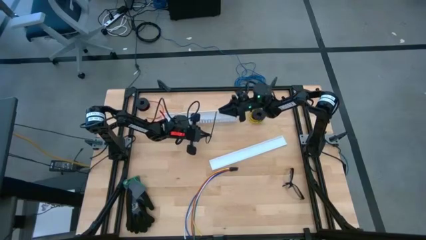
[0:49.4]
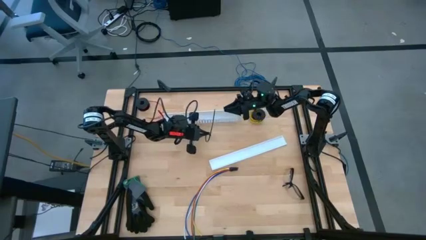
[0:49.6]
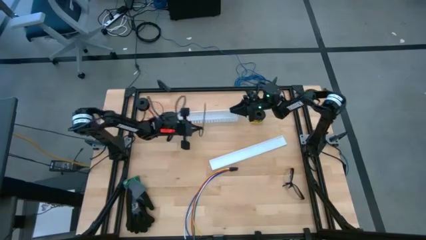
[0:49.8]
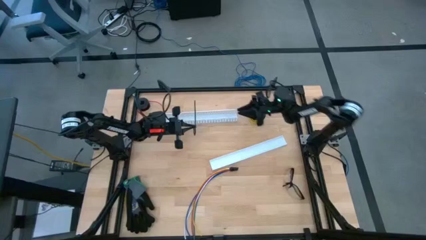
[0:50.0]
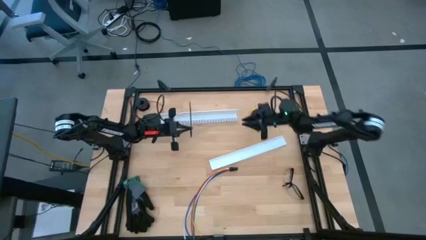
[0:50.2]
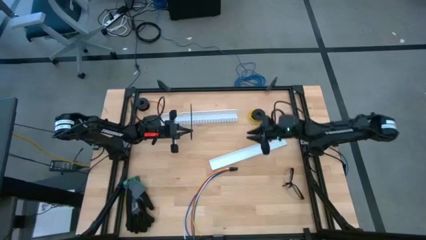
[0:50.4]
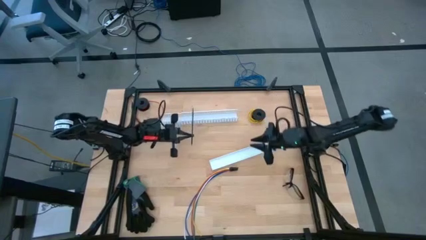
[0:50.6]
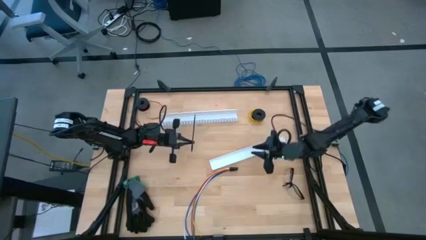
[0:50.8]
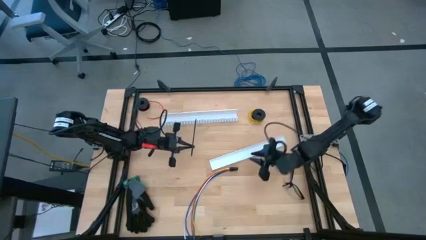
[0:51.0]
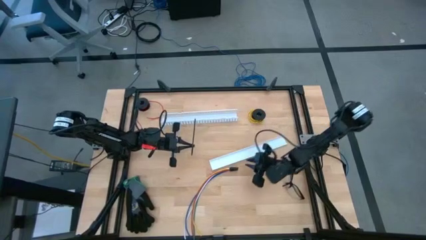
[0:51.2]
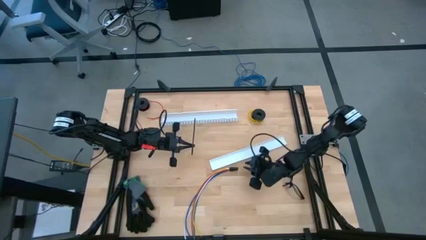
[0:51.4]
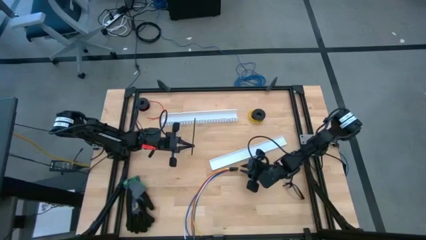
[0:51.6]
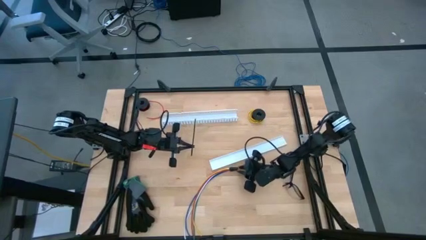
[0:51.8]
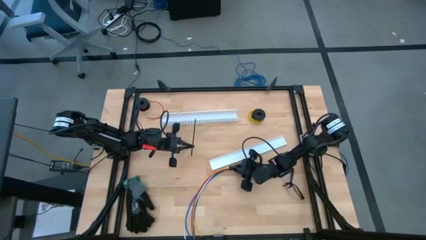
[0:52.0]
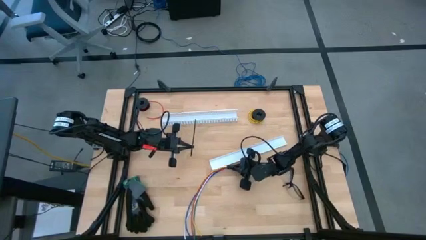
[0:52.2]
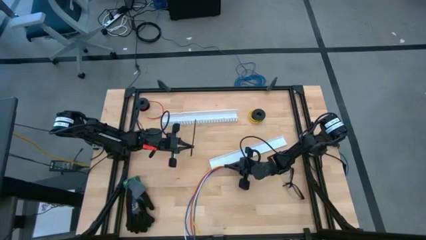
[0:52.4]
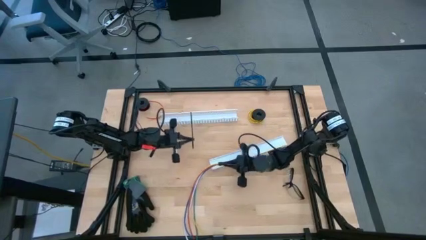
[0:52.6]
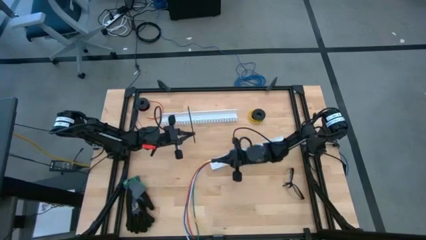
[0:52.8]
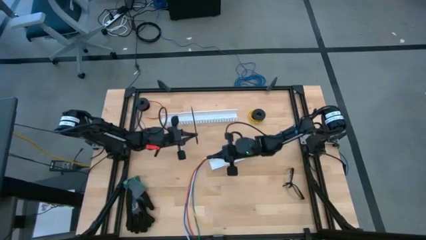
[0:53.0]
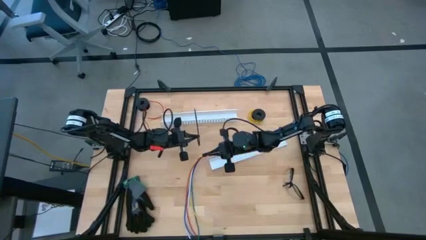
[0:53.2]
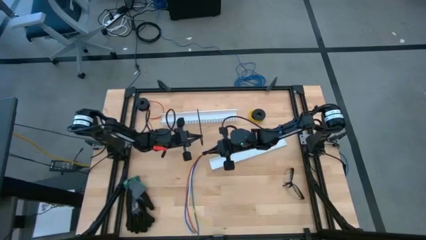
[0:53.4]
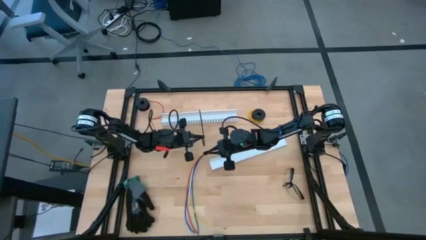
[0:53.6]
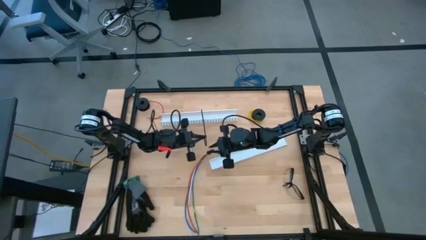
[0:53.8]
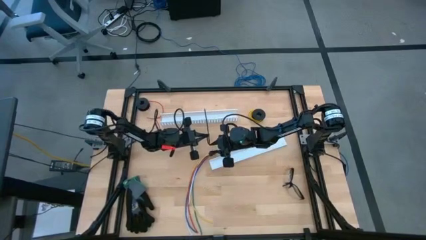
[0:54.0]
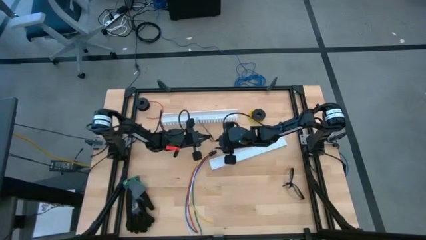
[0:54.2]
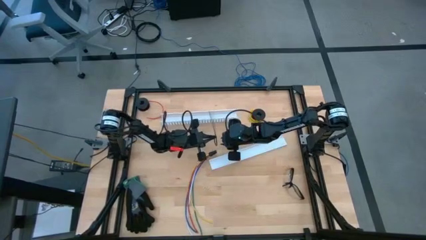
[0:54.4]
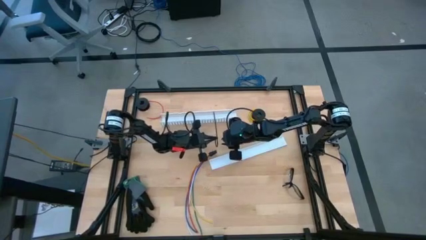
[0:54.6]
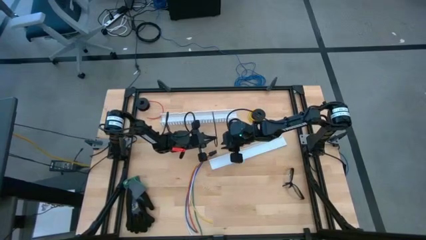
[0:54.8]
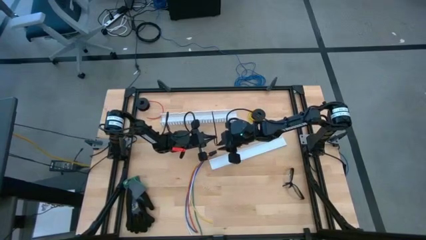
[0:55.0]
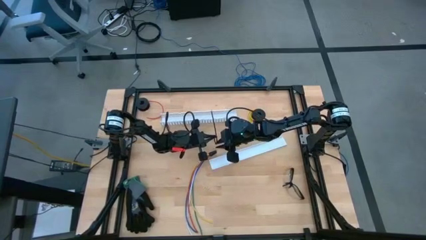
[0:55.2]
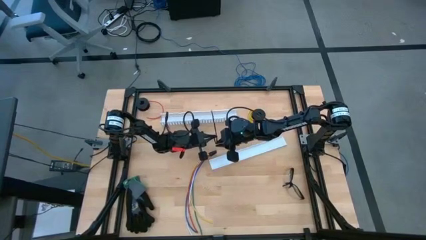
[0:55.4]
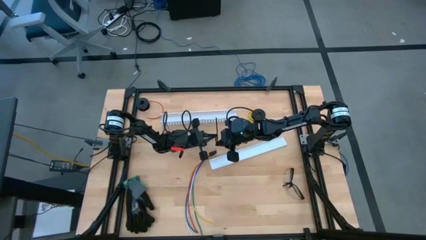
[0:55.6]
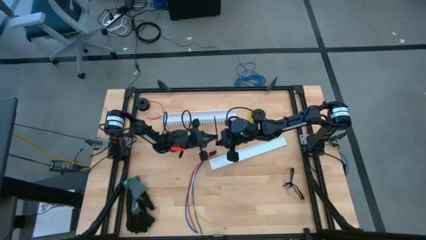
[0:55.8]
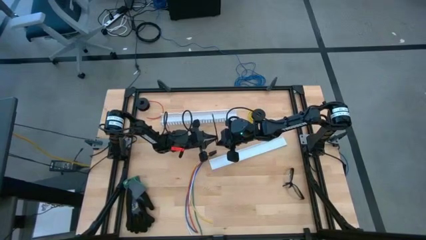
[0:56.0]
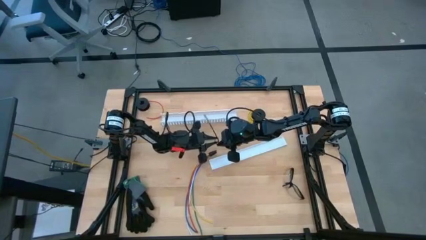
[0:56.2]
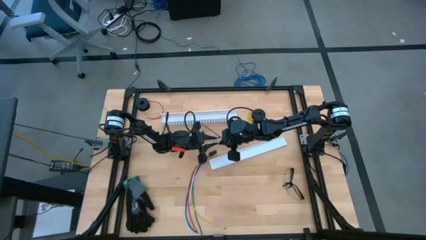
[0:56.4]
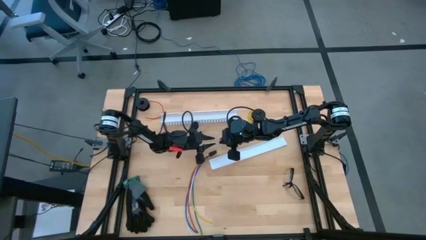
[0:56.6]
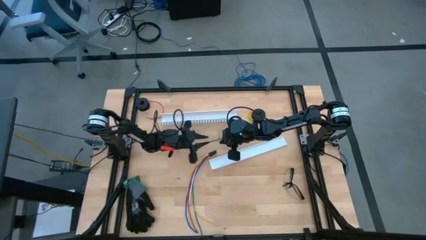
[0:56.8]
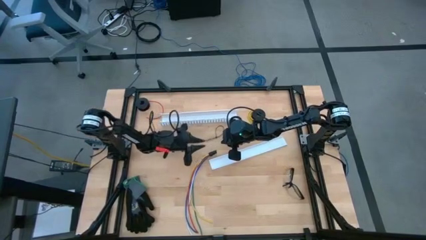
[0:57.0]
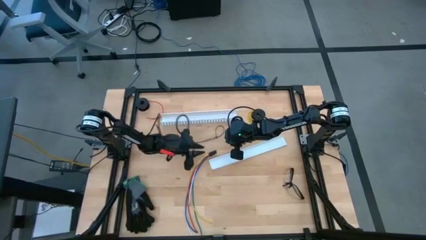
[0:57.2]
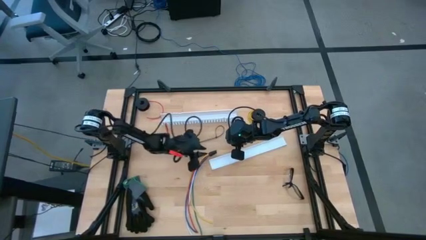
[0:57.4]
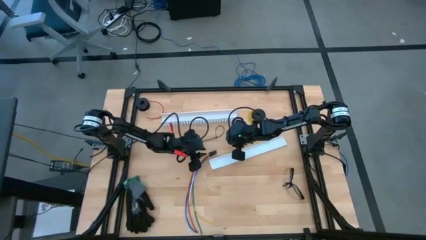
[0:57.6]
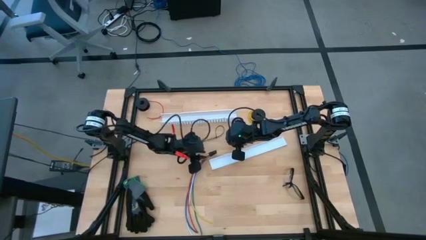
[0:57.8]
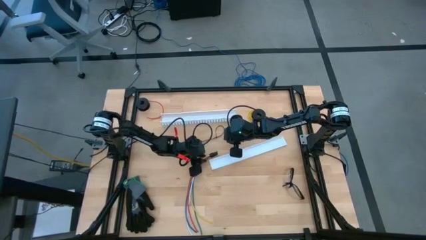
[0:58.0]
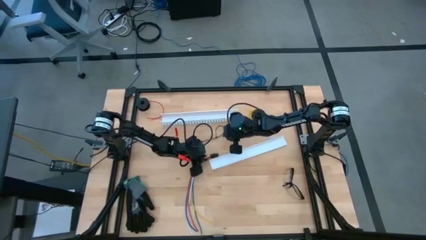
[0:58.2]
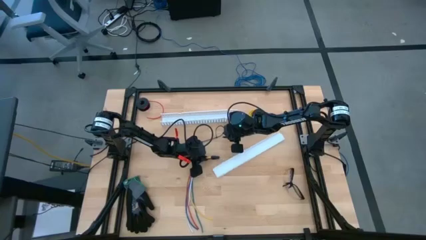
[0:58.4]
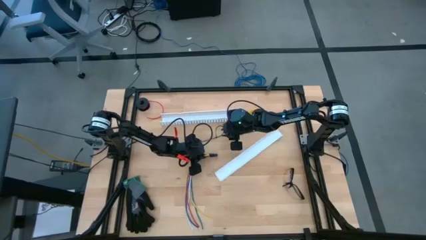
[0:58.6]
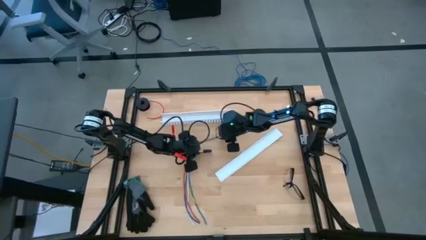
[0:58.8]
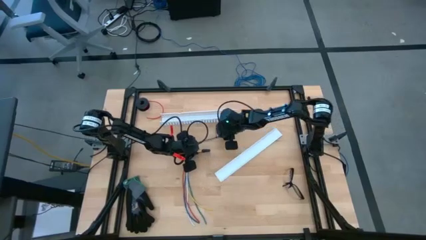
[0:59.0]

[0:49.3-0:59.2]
Task: Ziptie cables
Wrap the cables together using the black zip tie
